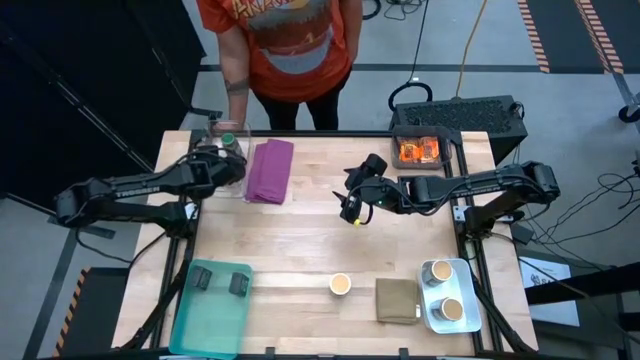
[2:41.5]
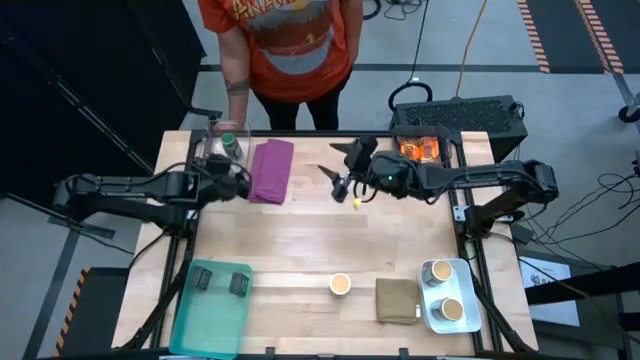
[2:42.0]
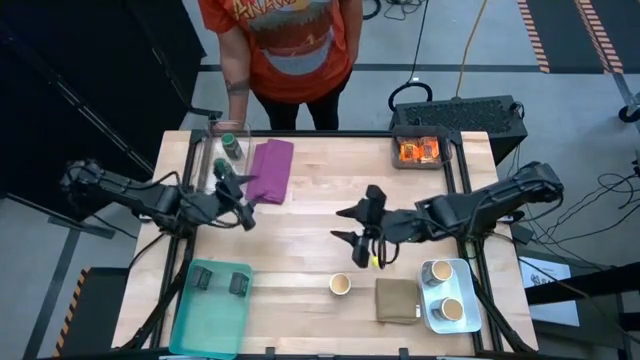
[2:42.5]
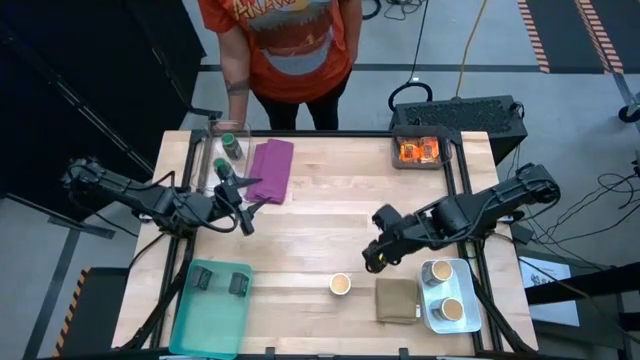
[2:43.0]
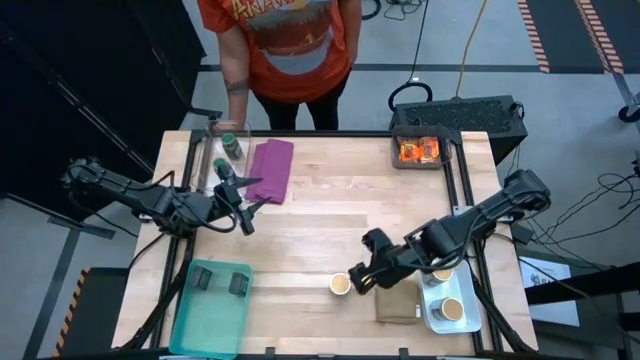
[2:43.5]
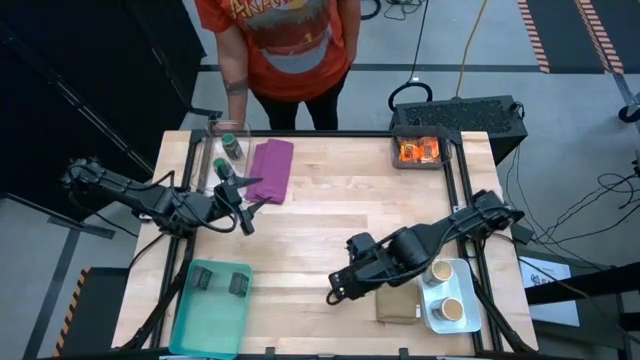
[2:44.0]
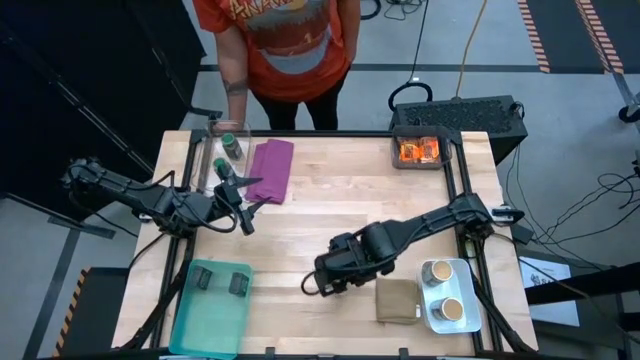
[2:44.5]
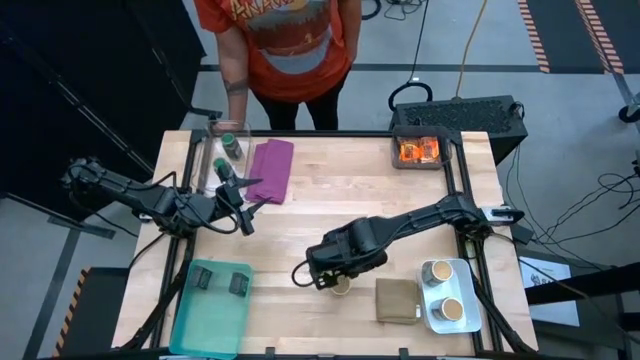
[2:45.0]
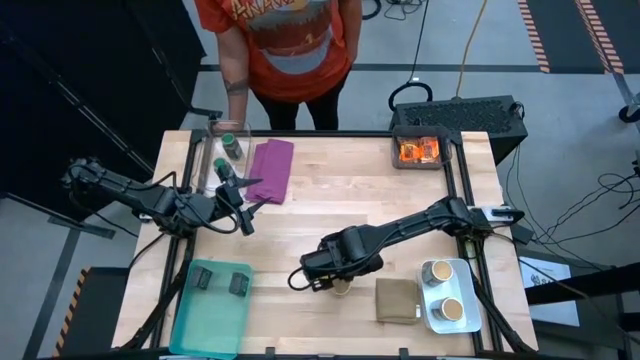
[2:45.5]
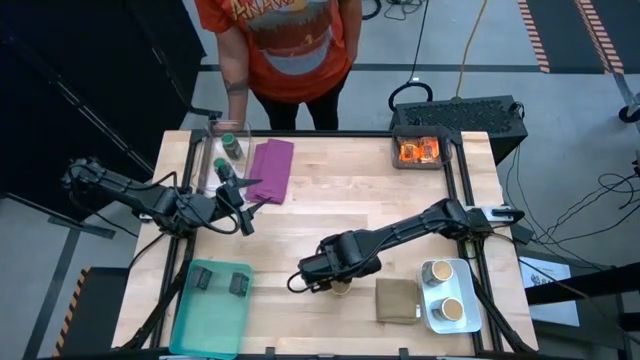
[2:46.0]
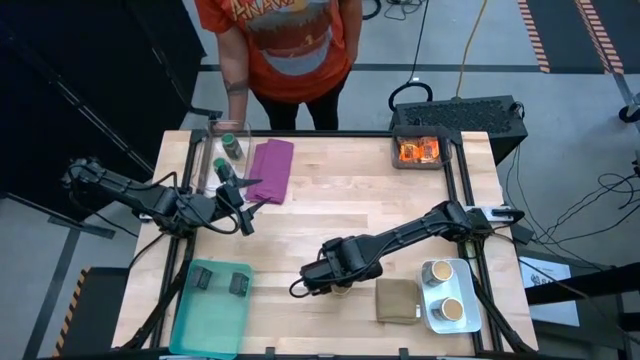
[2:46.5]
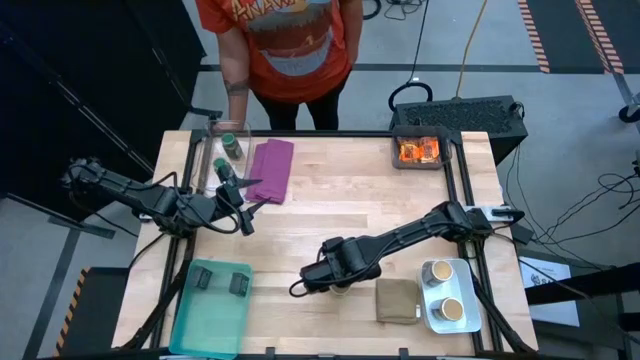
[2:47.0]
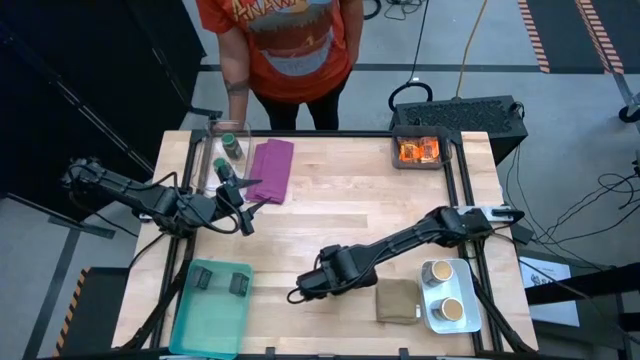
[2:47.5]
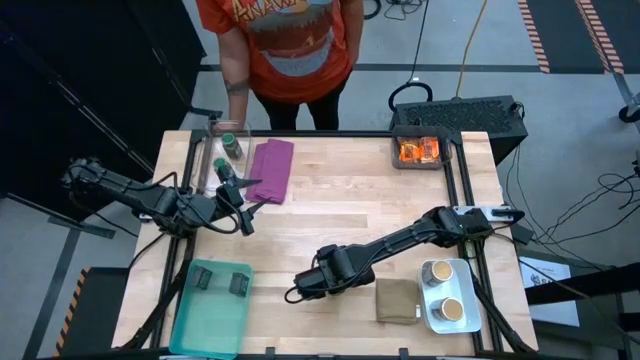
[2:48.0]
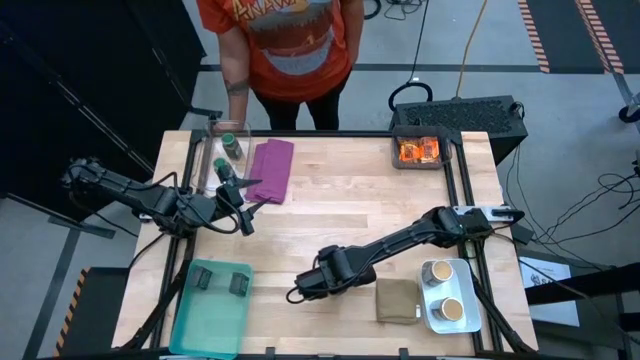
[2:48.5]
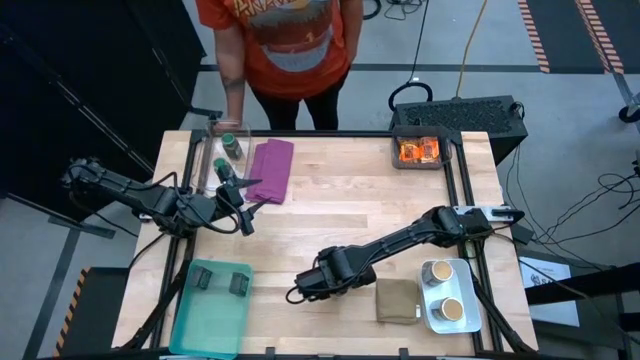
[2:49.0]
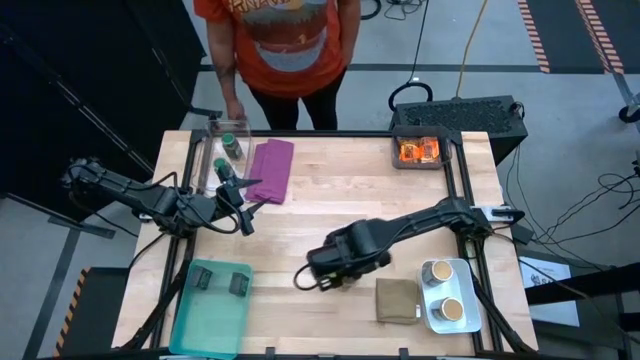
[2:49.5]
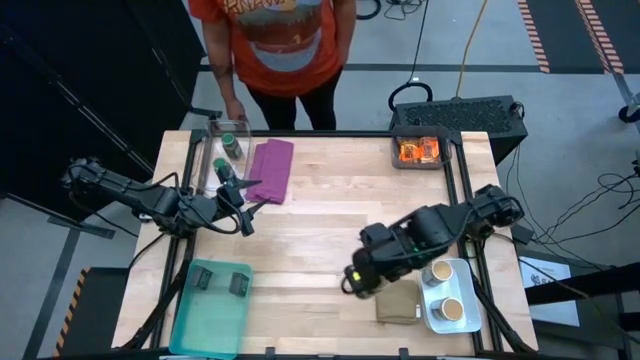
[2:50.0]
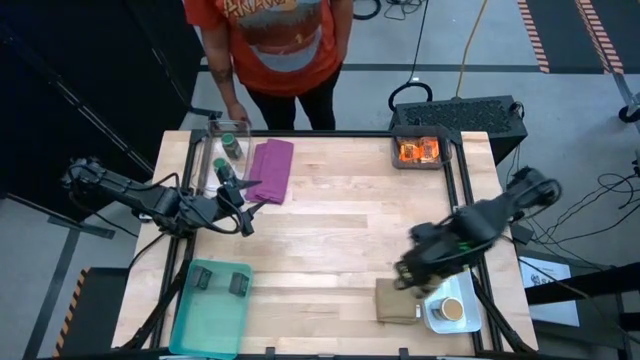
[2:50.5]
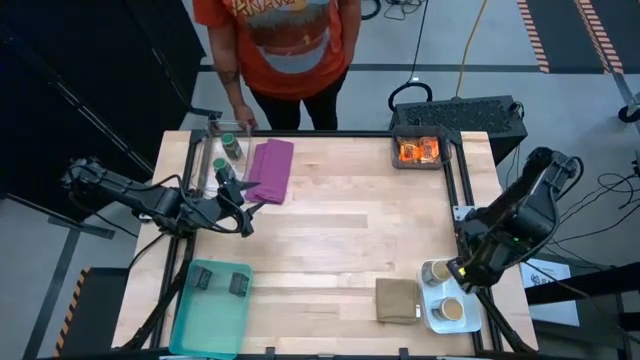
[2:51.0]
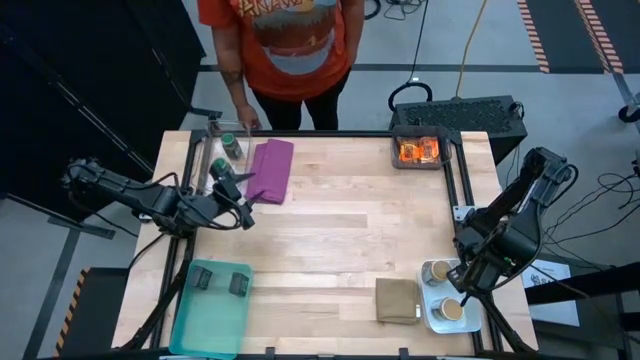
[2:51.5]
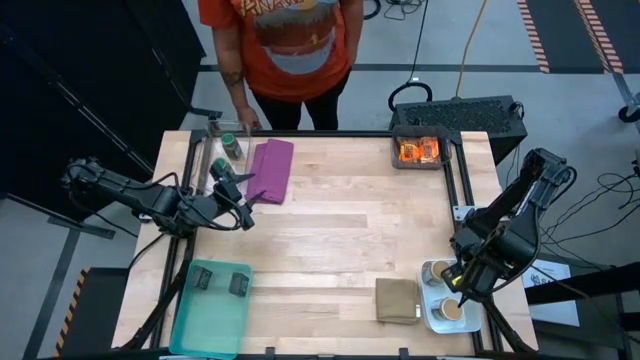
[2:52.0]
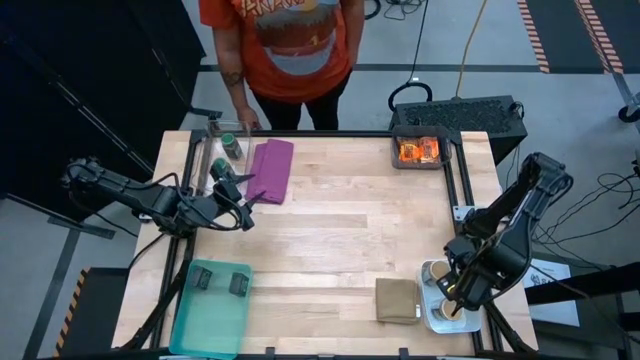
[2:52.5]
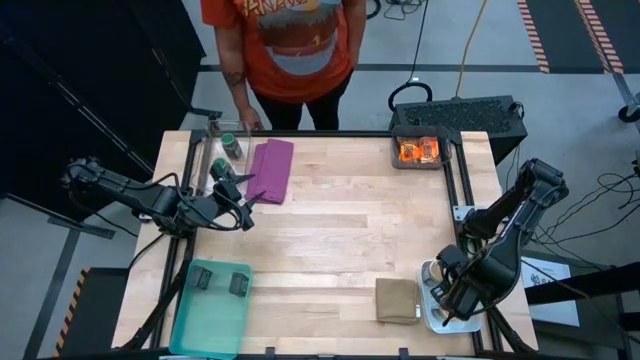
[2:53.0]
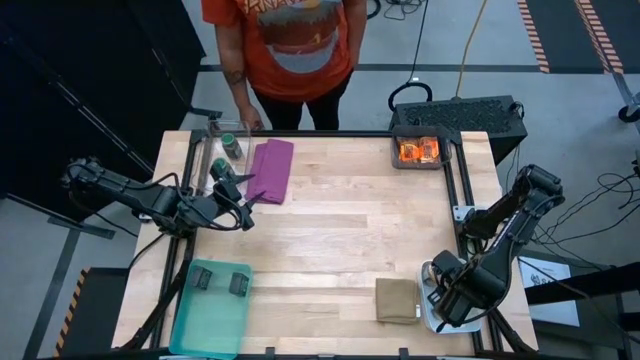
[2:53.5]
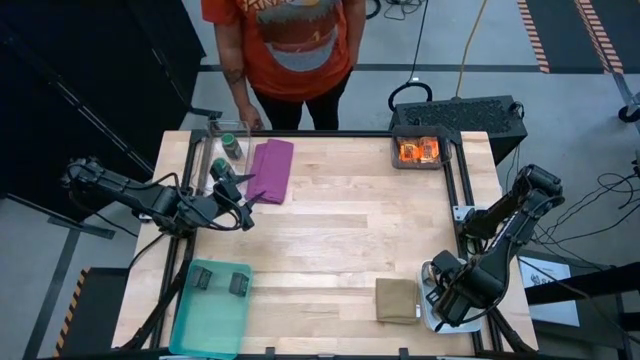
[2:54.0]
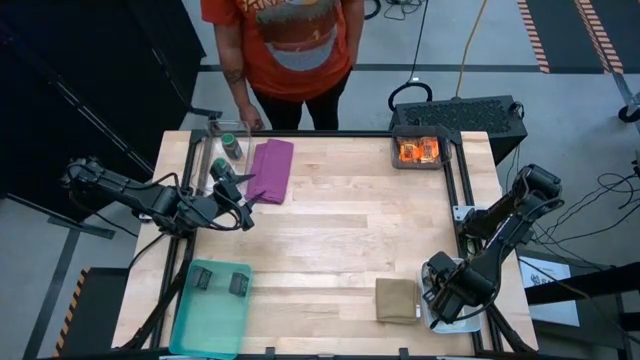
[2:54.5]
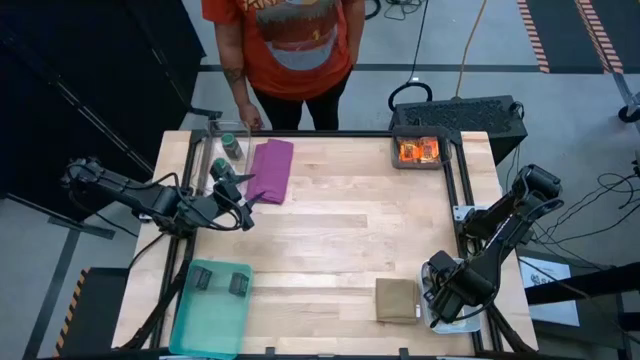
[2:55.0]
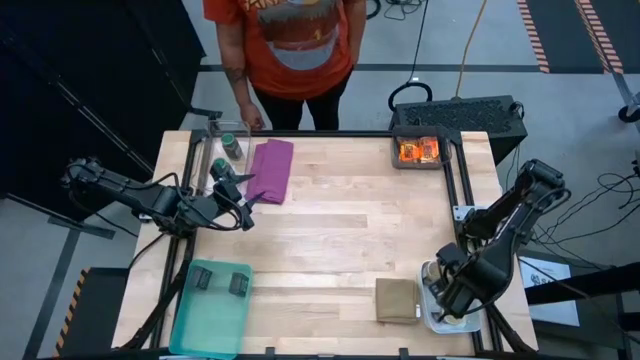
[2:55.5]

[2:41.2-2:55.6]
Task: Sort spices by type
Put the golden seasoning bottle into the white bin

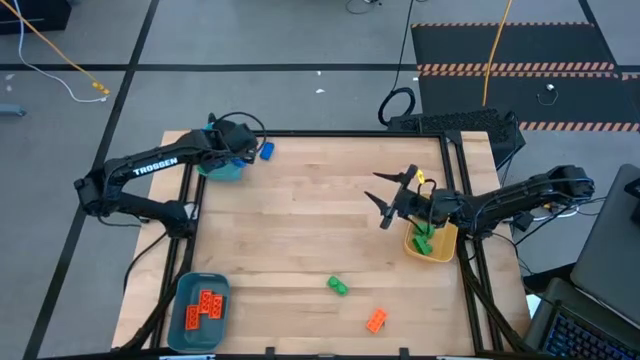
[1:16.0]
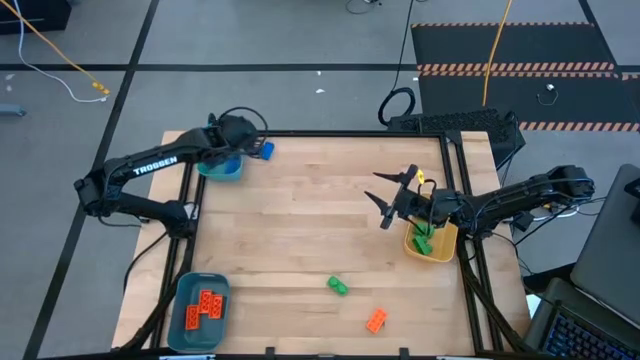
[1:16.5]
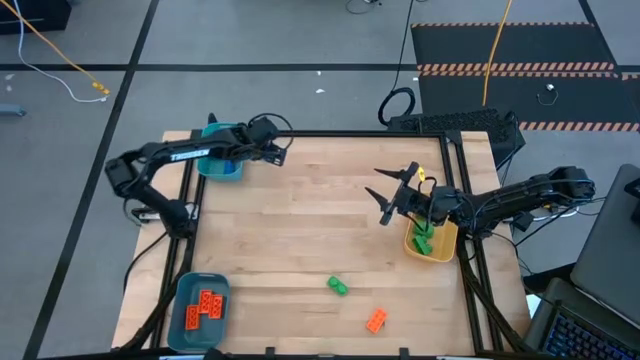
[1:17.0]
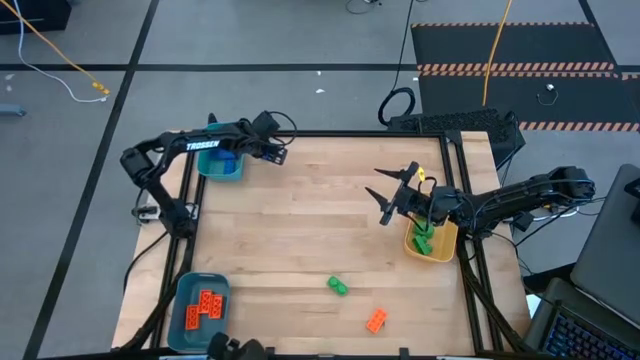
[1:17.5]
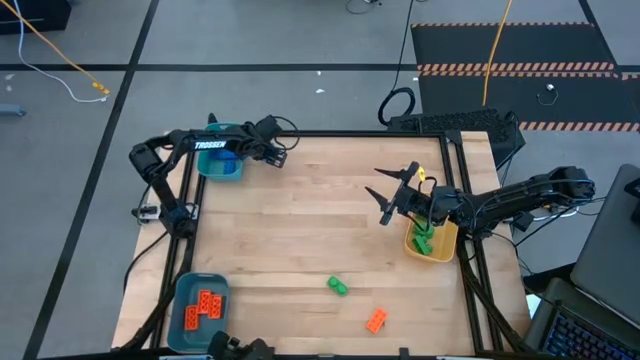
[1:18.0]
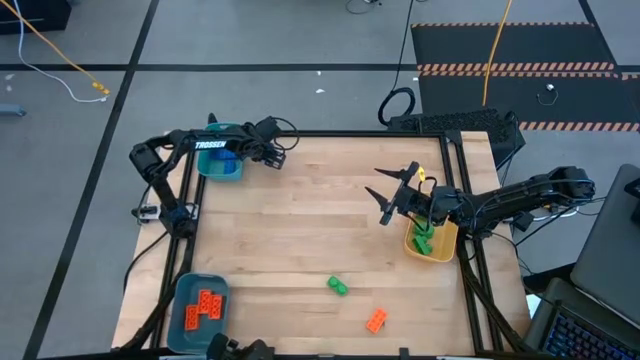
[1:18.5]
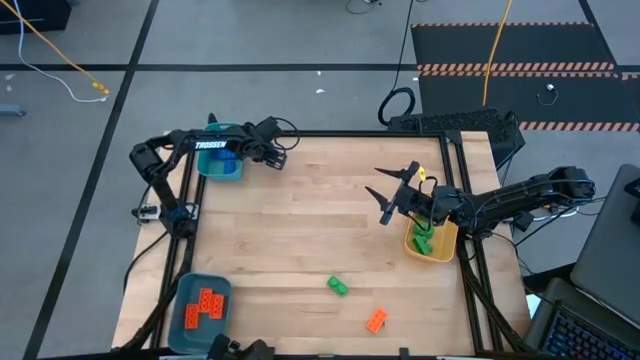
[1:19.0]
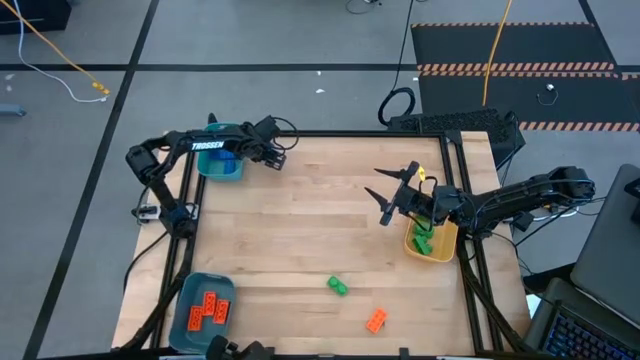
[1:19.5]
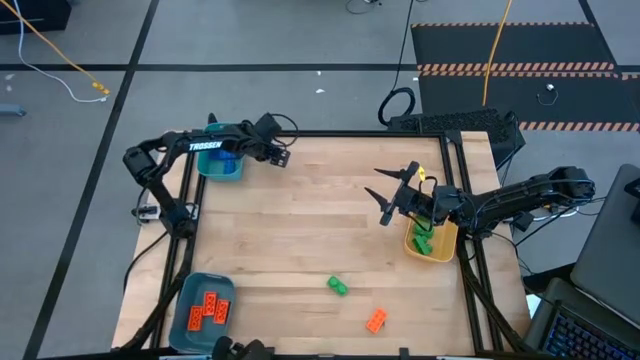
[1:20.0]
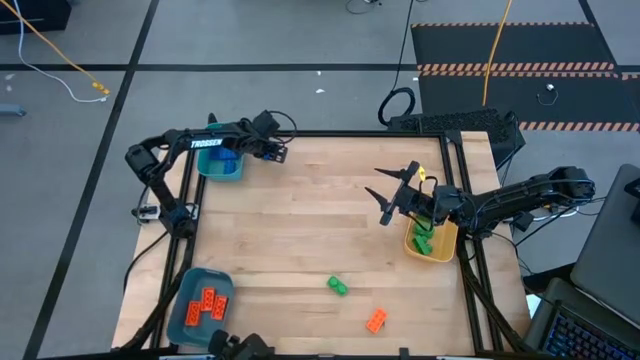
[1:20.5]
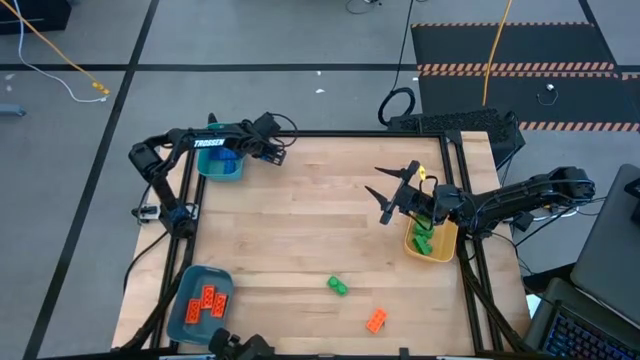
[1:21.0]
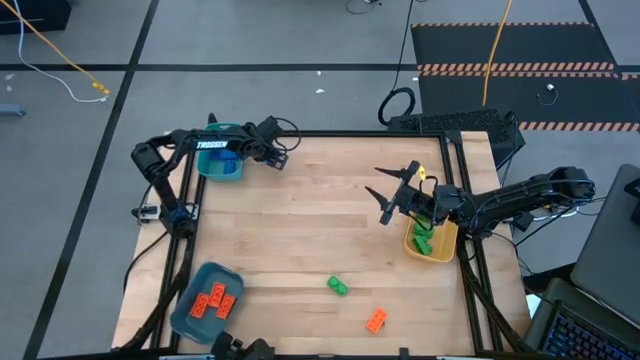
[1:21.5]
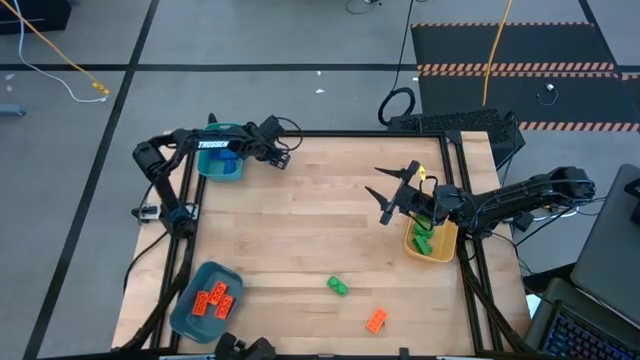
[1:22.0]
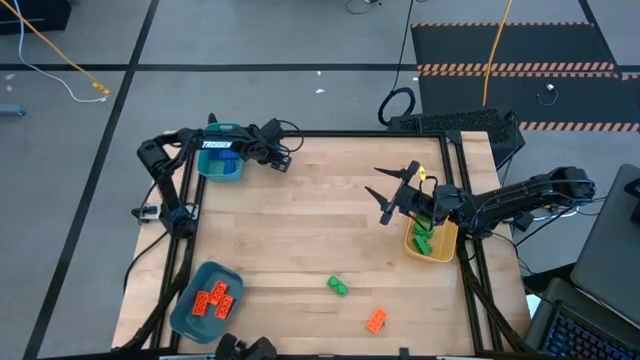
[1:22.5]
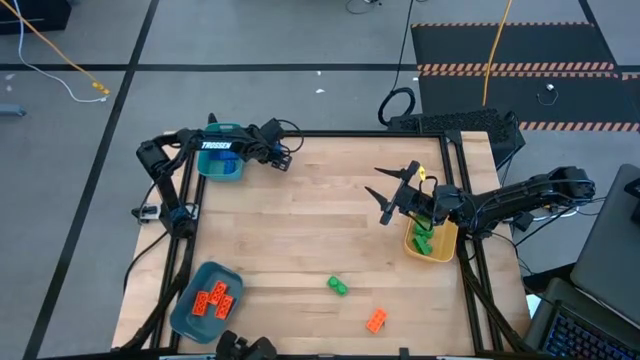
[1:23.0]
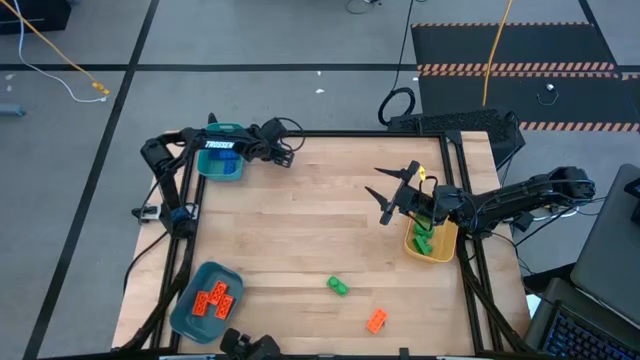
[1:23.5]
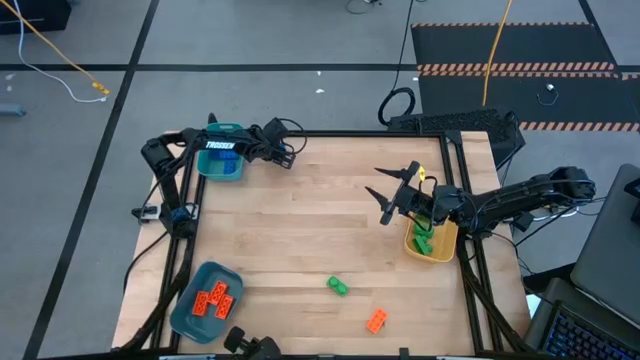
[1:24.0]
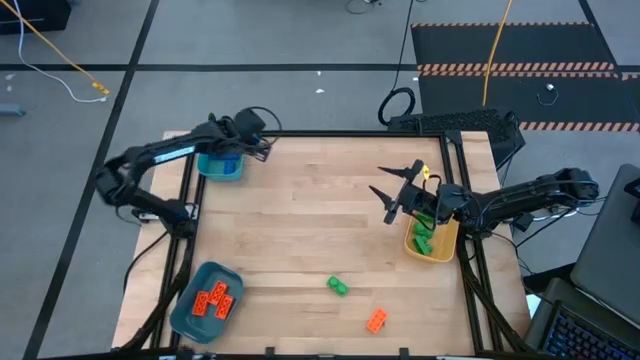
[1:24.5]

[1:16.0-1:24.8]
Task: Sort & place blocks by color
Put the blue game piece into the light blue bin
